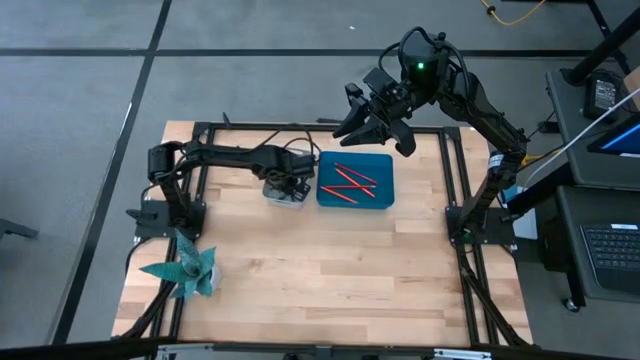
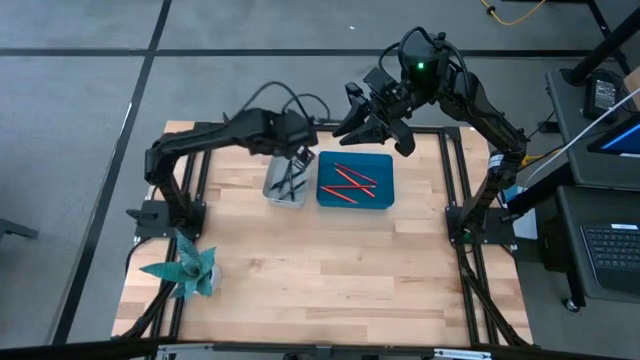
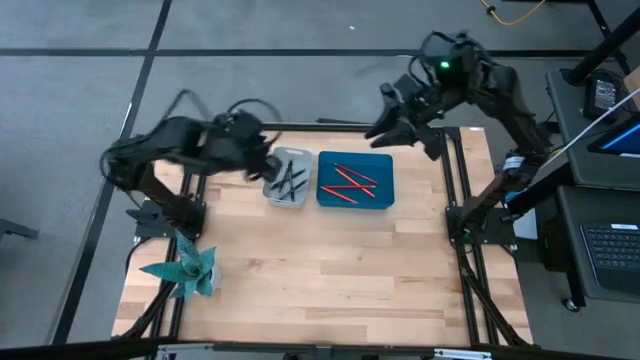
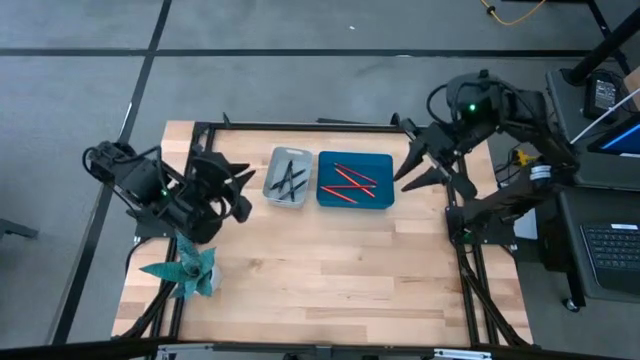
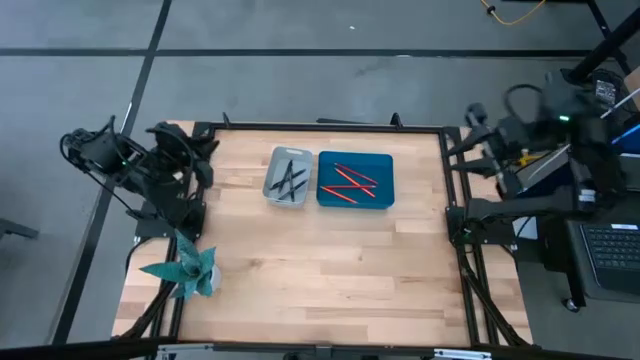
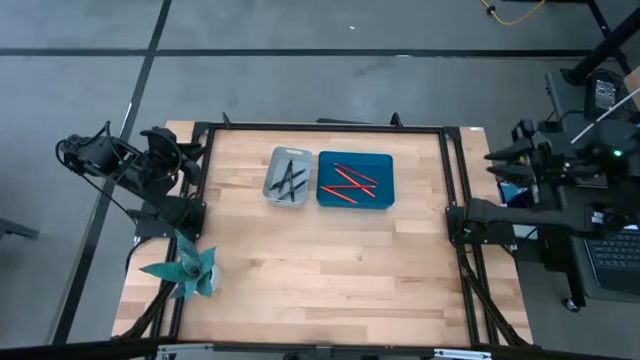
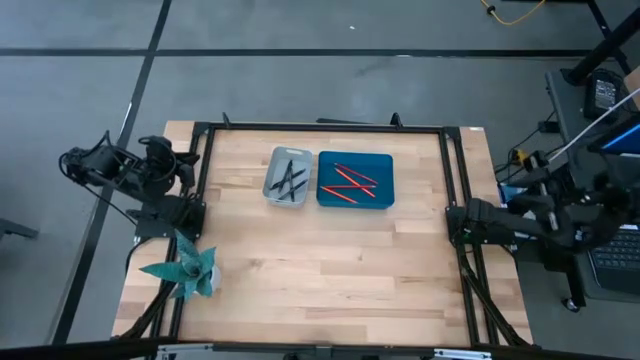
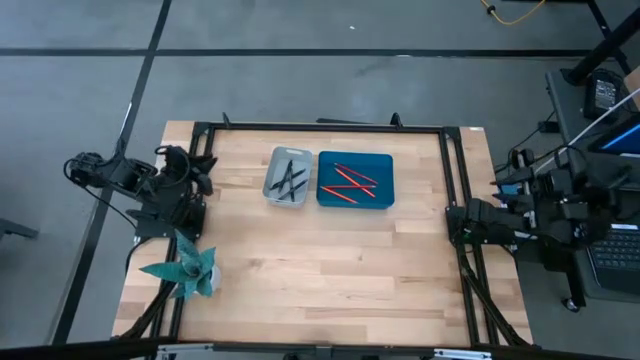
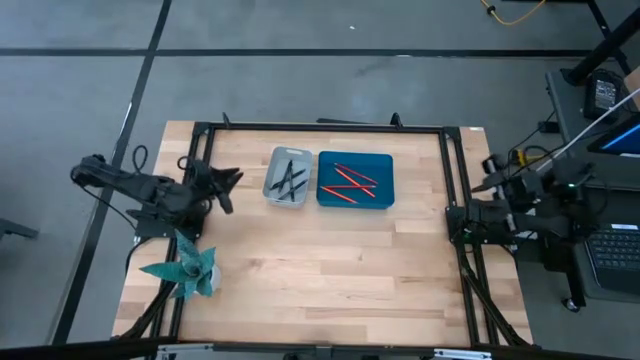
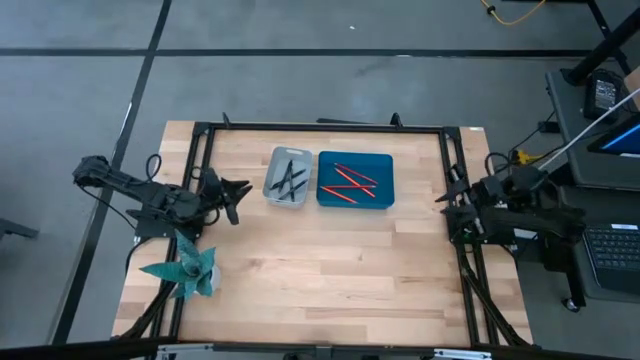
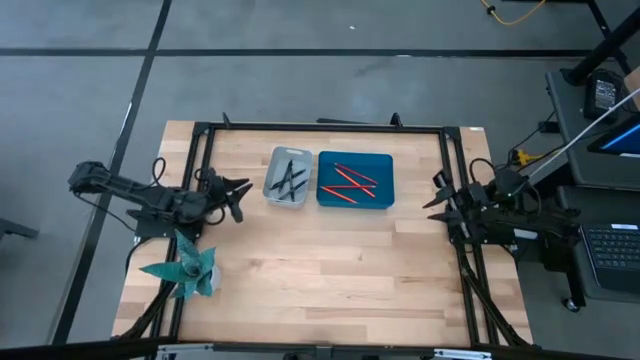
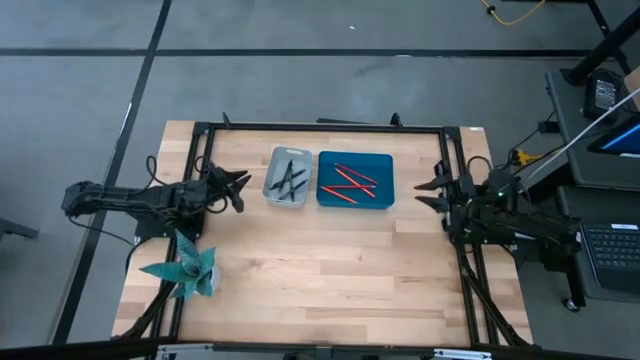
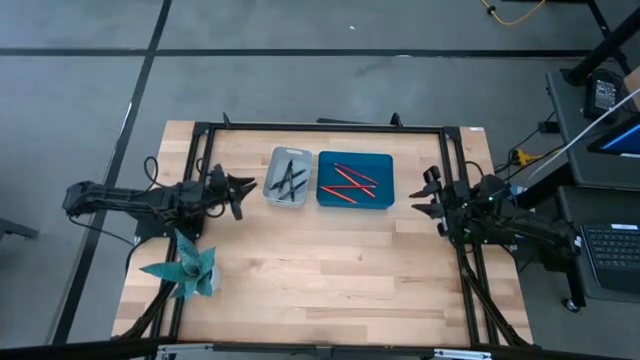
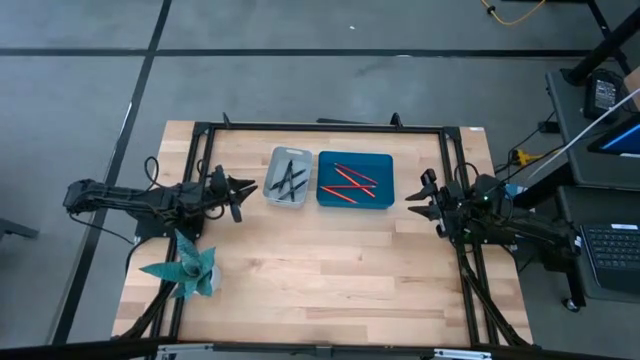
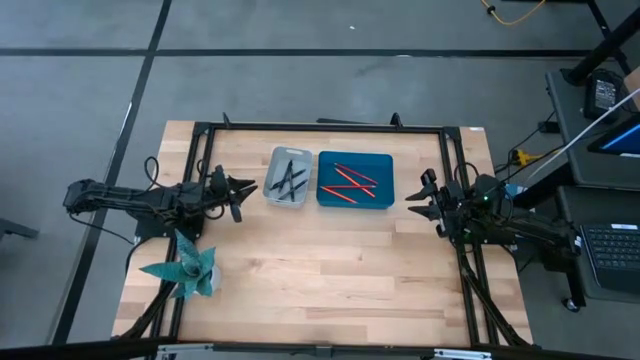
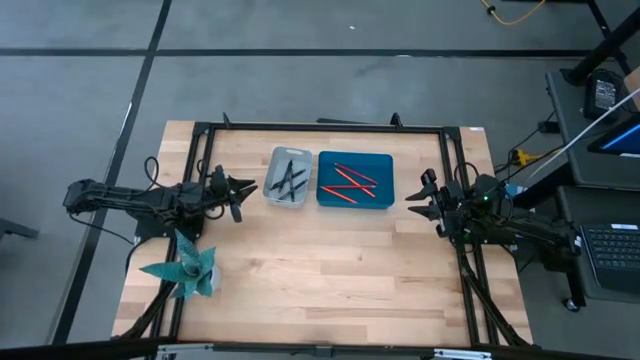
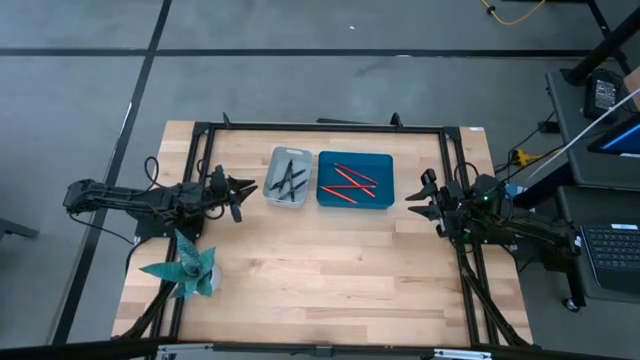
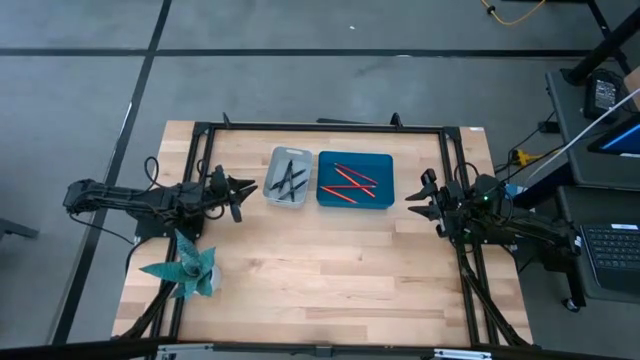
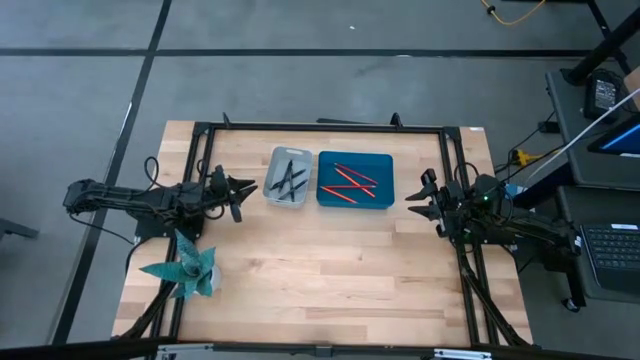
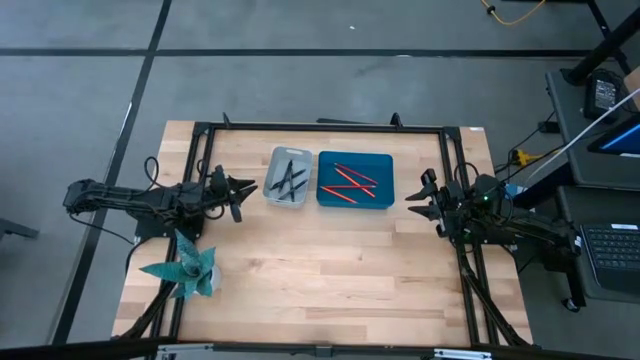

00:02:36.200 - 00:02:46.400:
Task: Sort pens & pencils
Return to Home Position

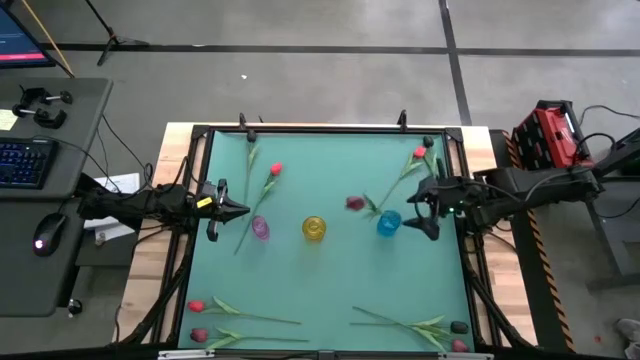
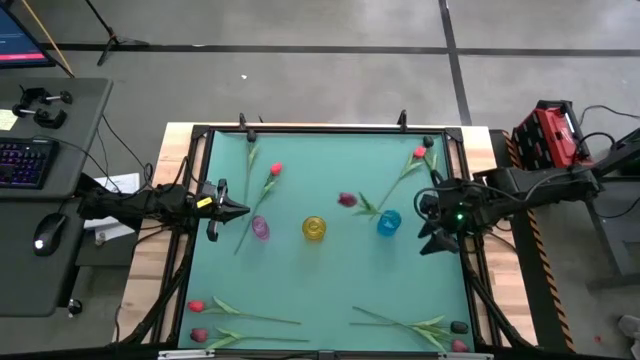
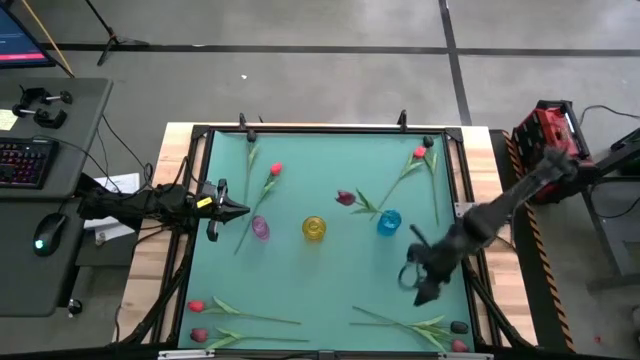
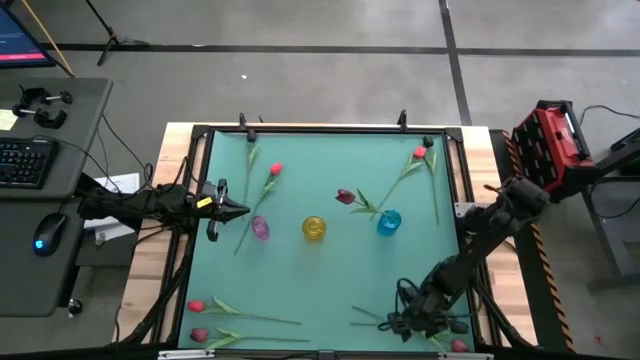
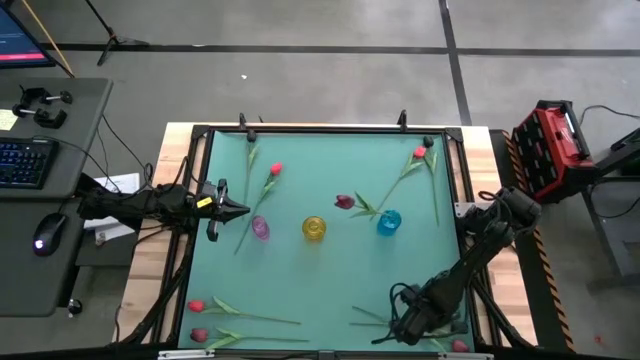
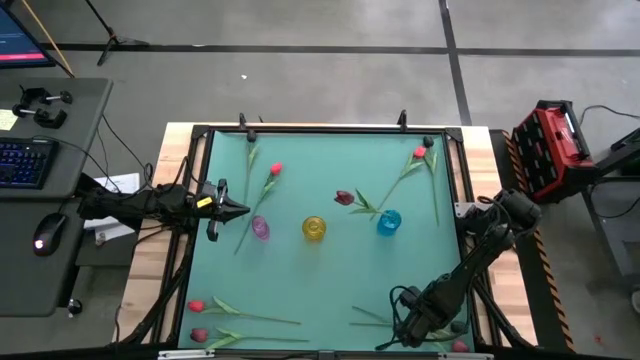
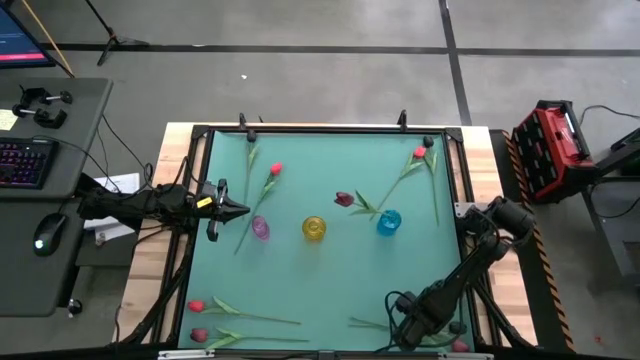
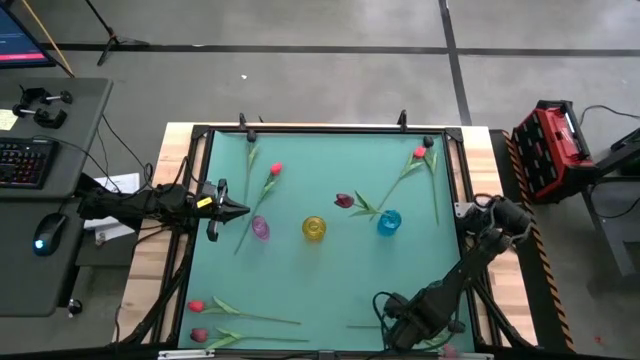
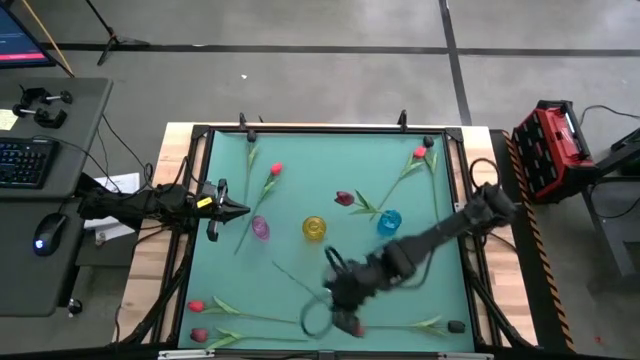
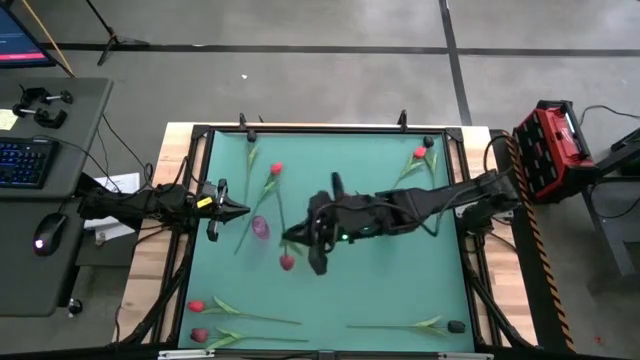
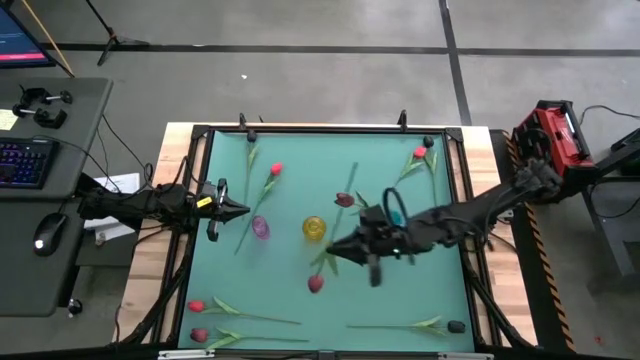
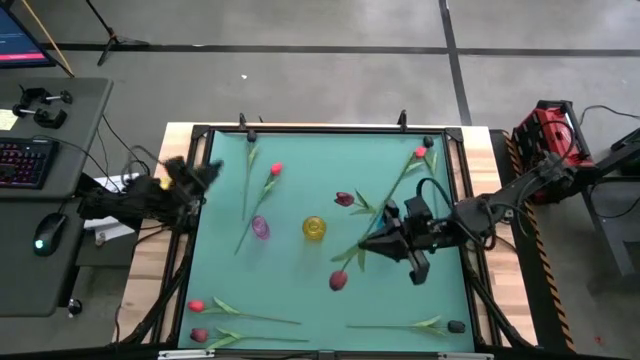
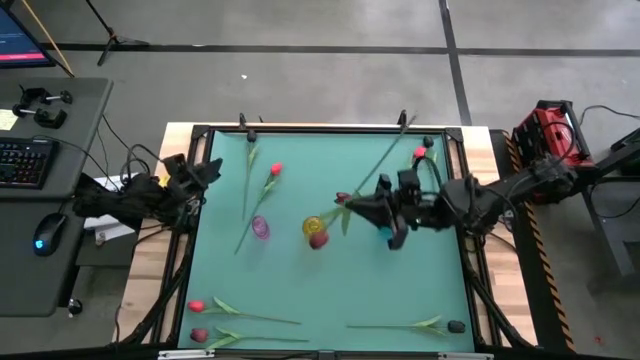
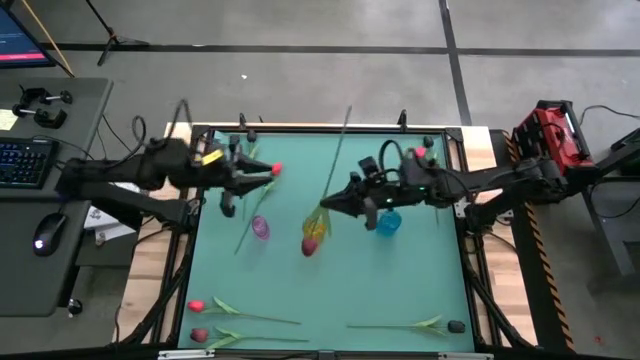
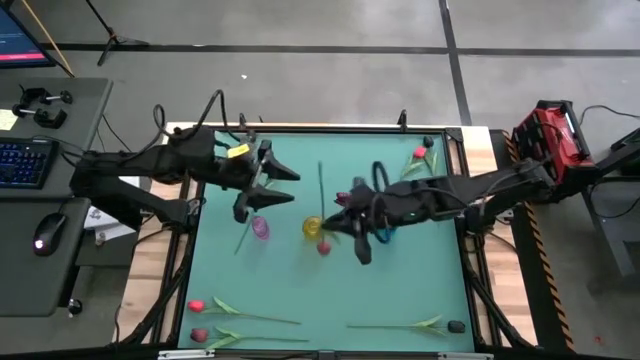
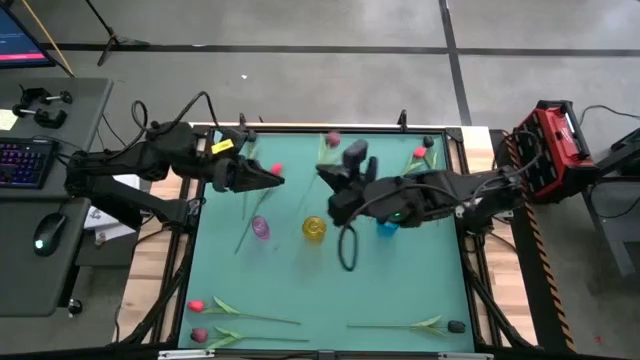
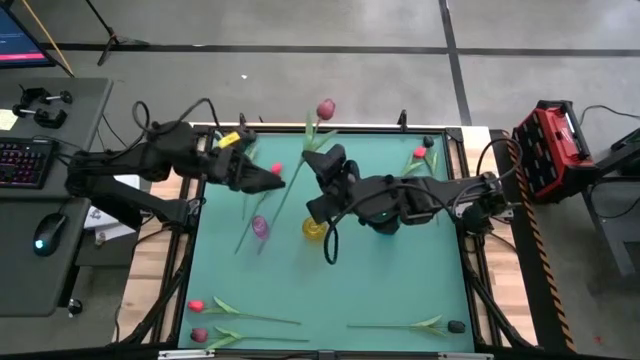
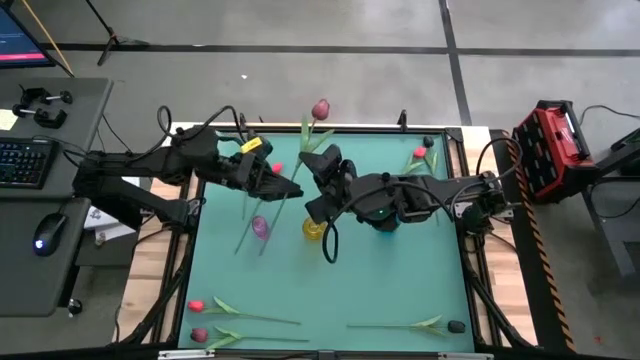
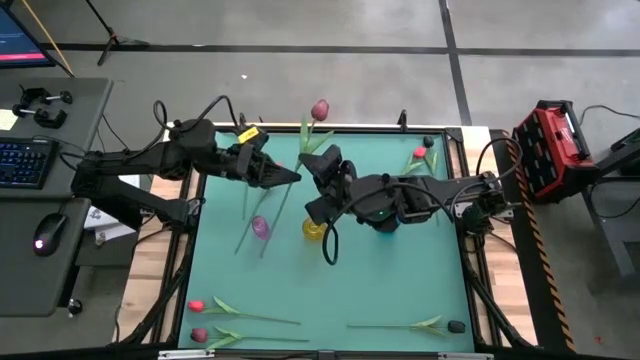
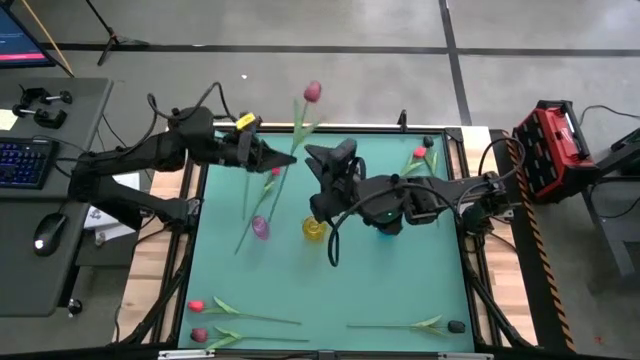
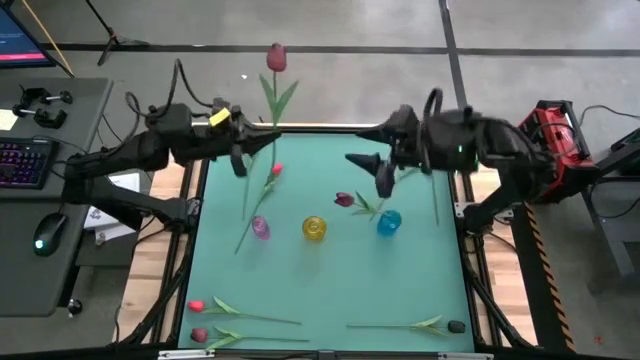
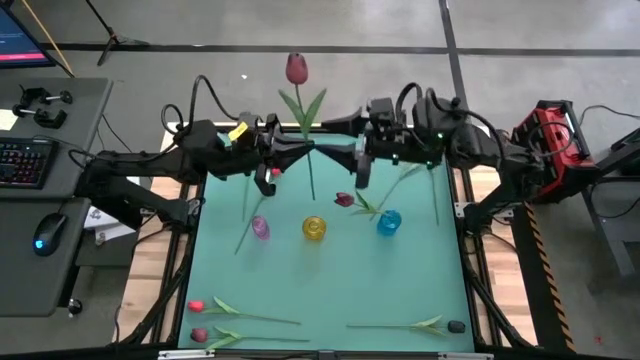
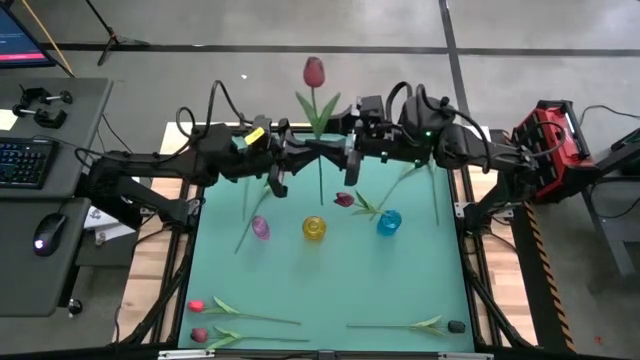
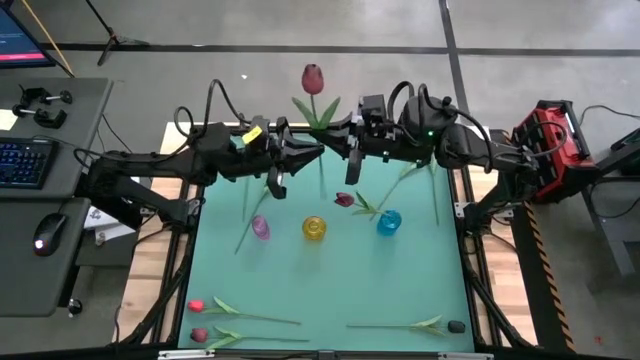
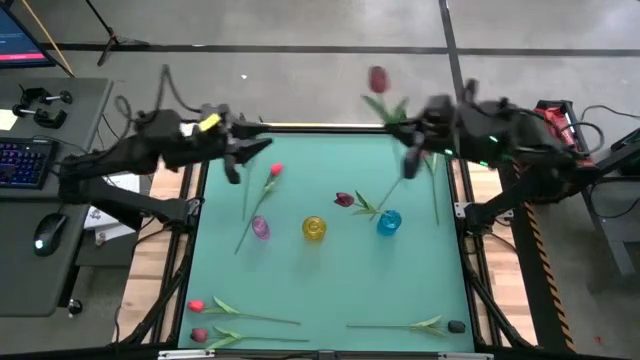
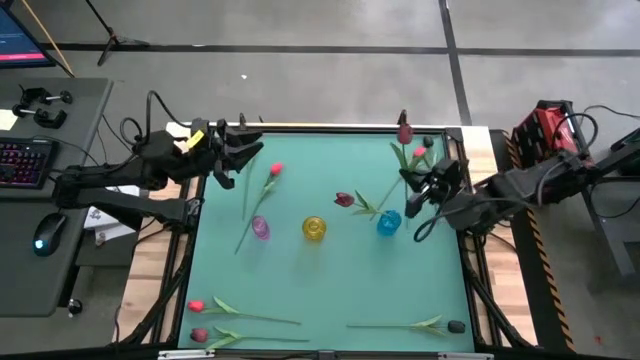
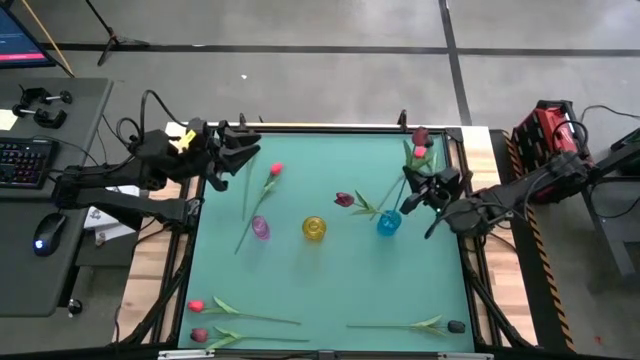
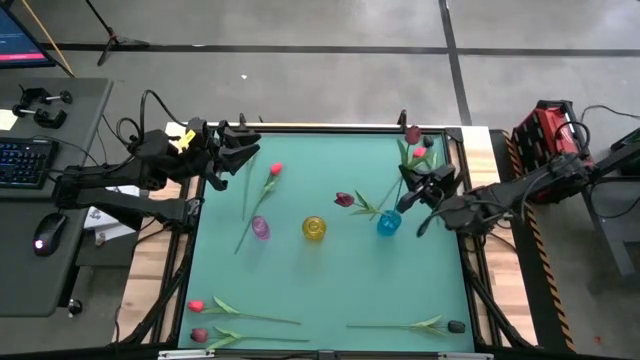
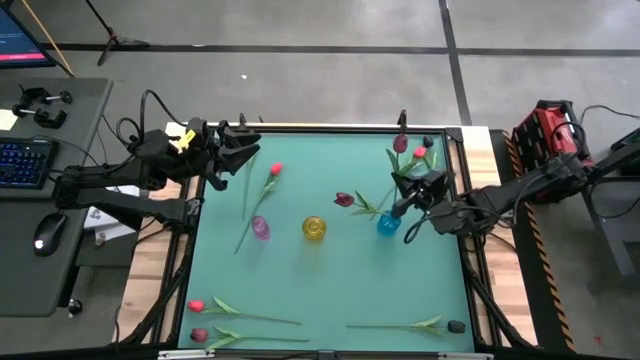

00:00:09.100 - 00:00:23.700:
Task: Sort flowers into vase by color
Put the right dark red flower into the blue vase
